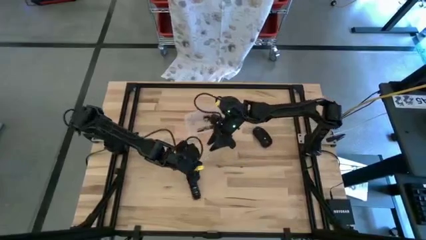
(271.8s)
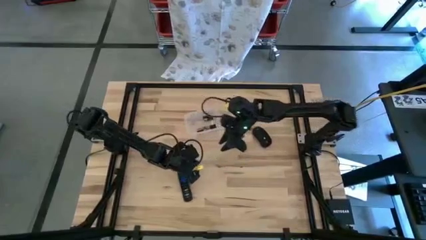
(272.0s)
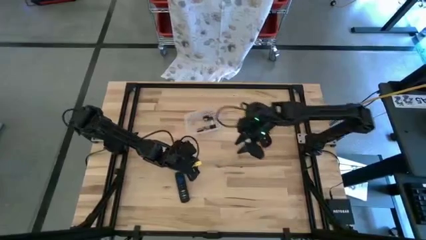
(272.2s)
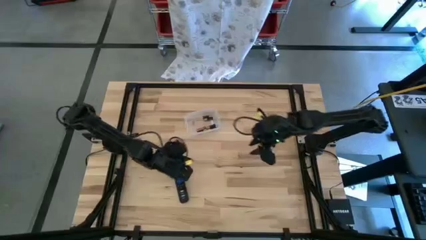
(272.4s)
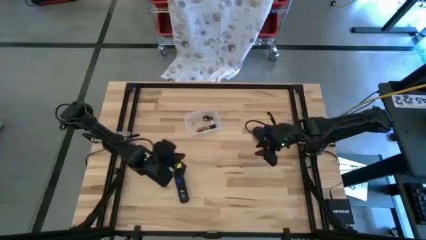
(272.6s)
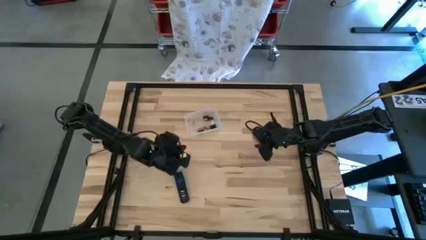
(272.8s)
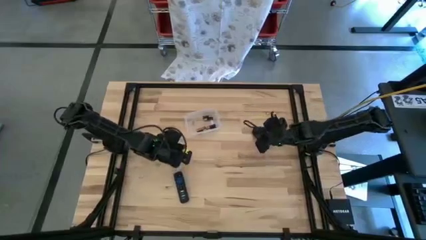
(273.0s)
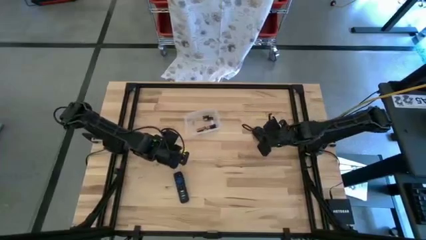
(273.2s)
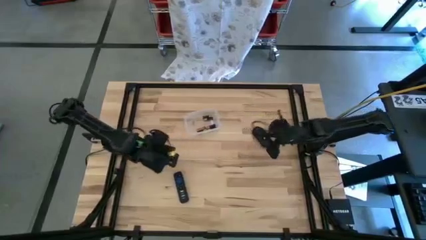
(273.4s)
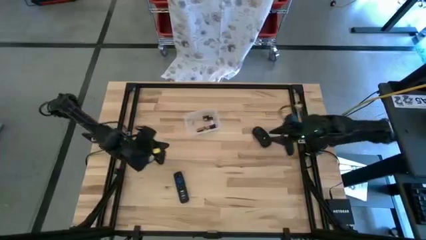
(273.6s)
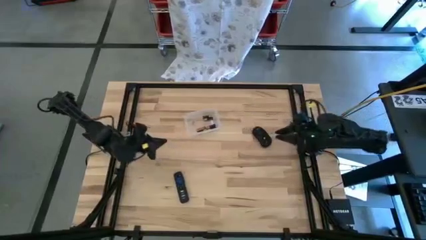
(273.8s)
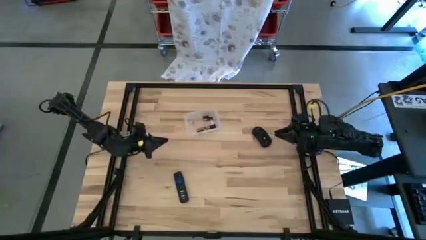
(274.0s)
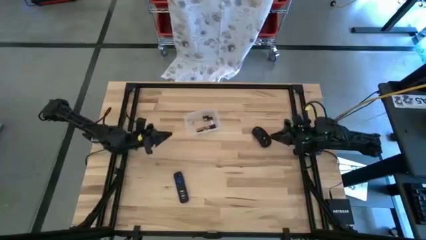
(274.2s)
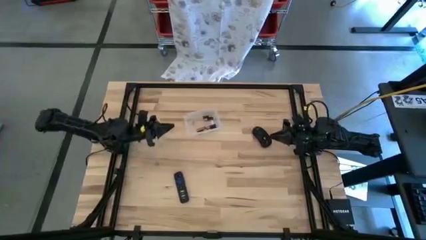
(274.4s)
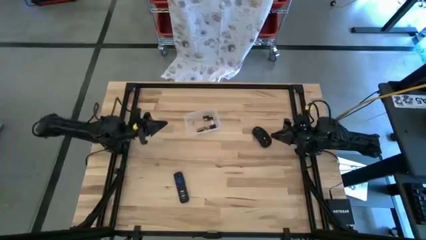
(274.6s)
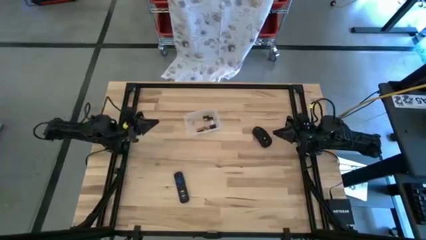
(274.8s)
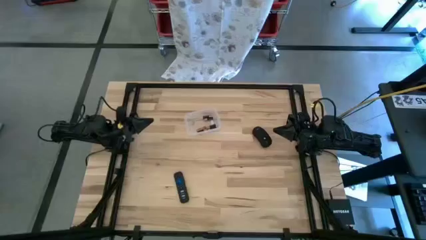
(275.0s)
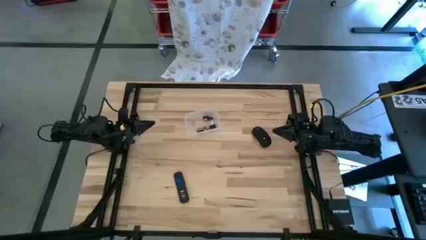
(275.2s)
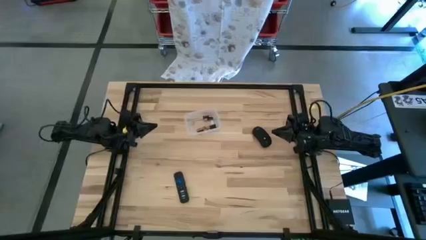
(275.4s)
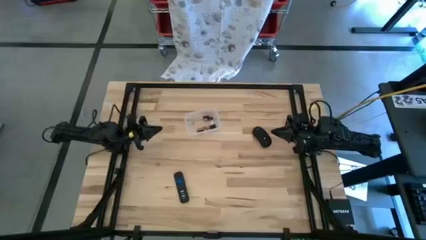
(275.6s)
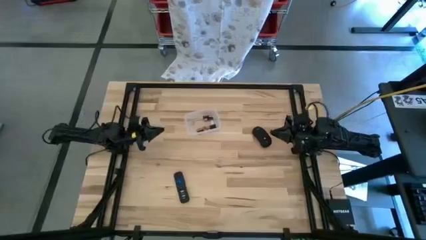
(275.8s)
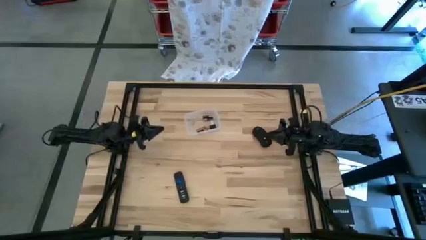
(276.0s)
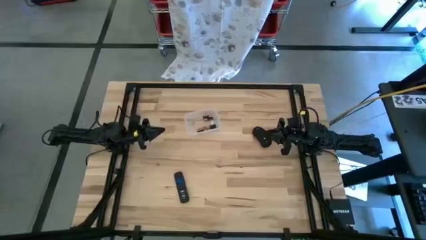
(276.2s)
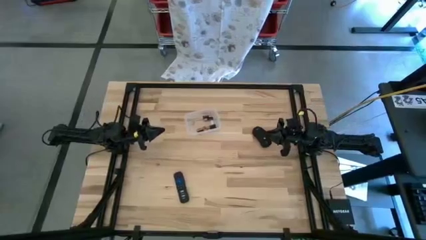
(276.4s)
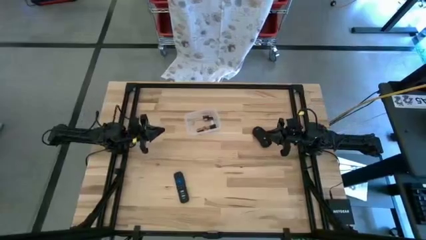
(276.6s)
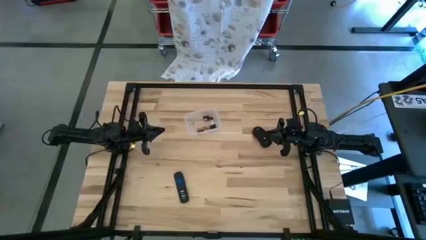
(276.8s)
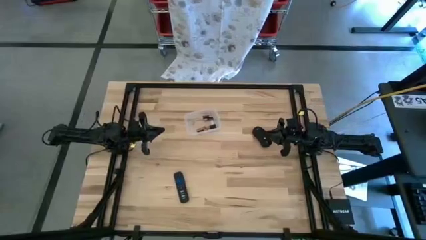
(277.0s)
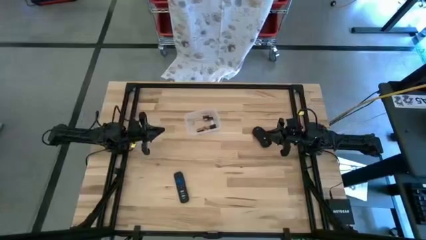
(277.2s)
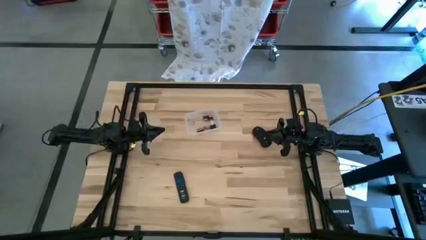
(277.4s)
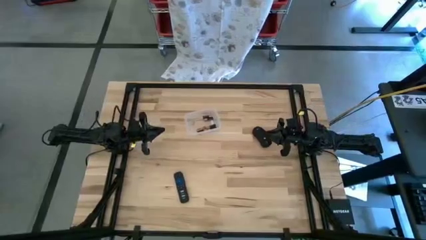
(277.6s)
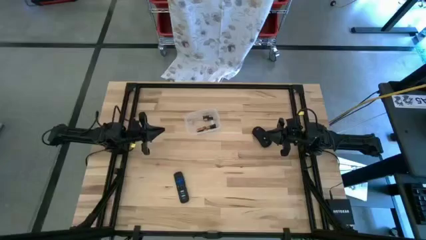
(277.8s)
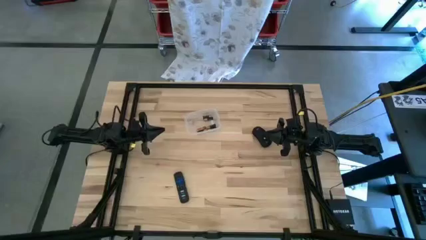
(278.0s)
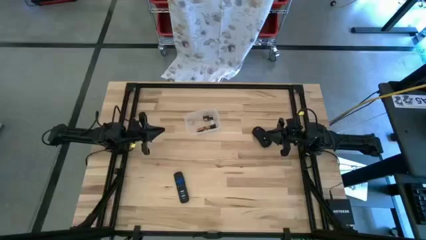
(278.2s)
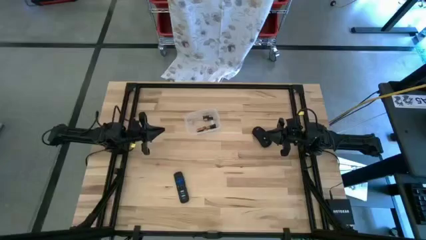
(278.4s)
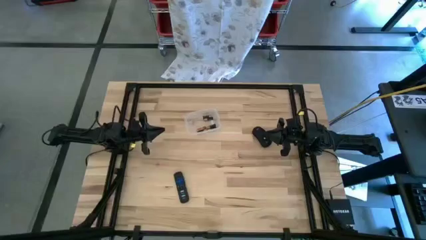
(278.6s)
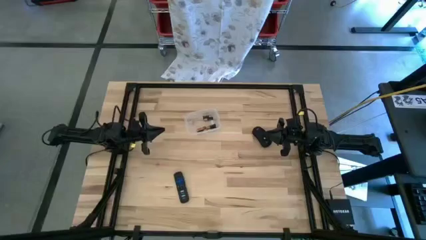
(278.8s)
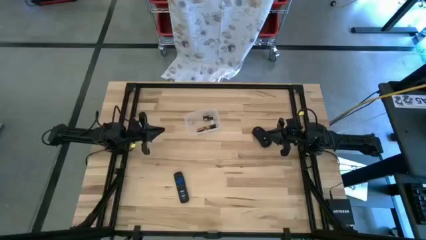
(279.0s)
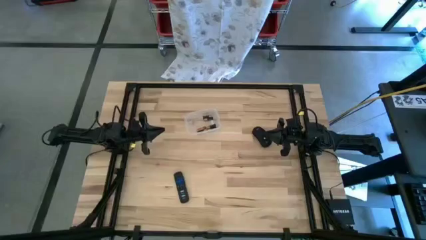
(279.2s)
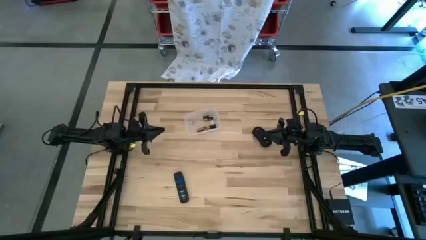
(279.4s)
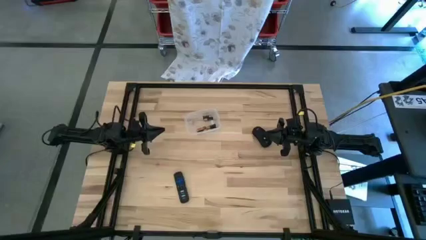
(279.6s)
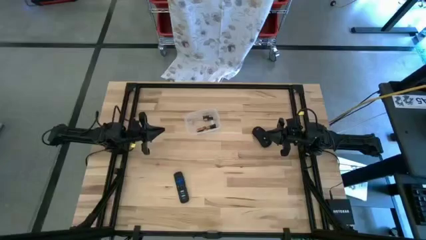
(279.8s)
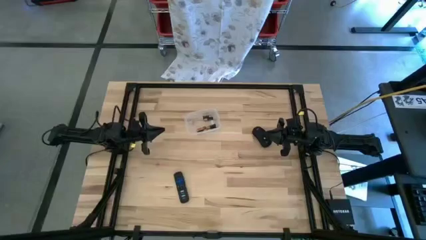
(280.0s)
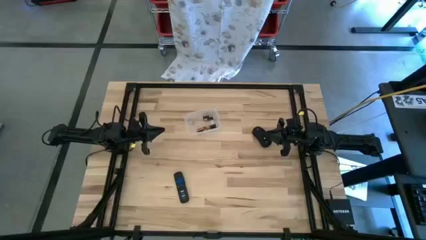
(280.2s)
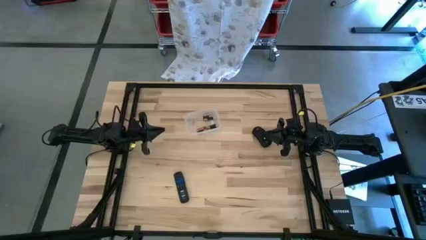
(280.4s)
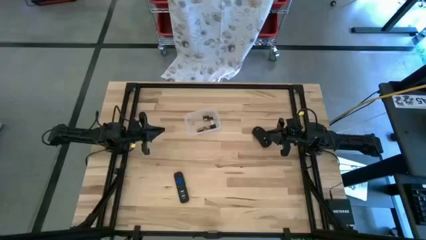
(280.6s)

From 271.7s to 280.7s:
Task: Insert battery
Return to Home Position

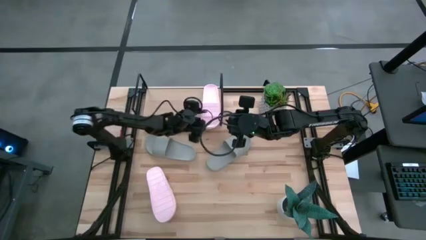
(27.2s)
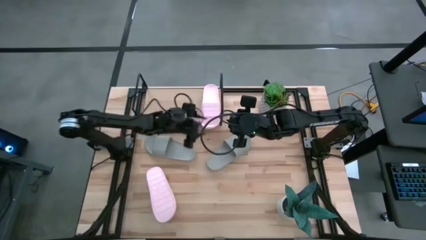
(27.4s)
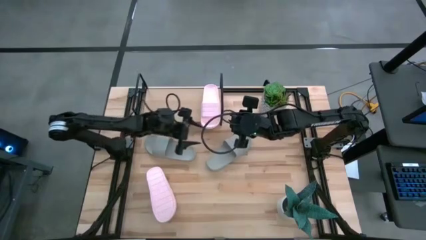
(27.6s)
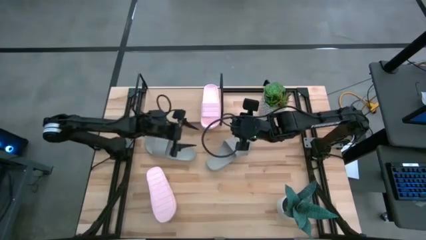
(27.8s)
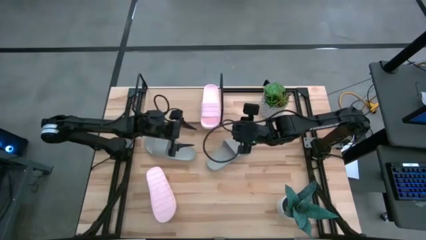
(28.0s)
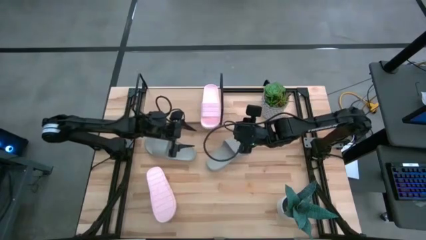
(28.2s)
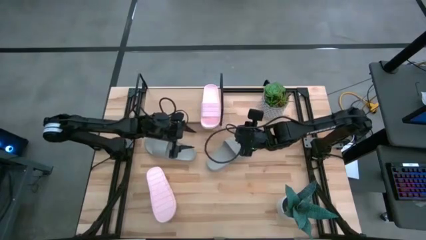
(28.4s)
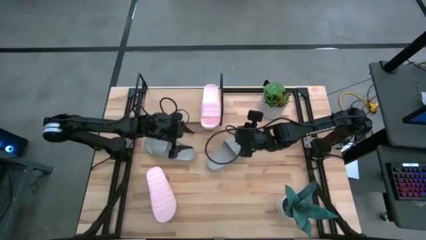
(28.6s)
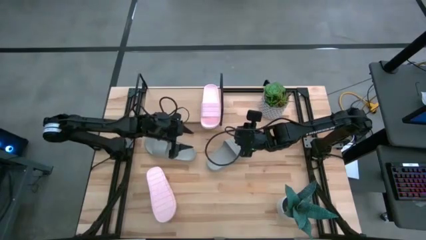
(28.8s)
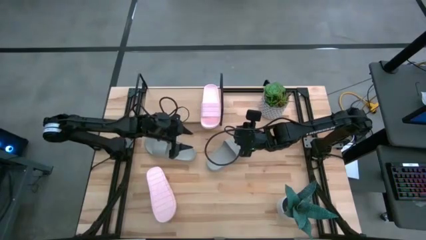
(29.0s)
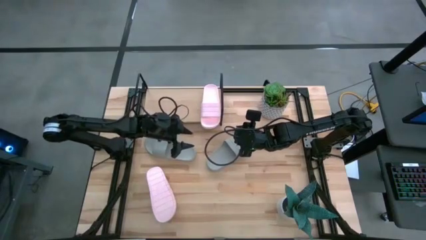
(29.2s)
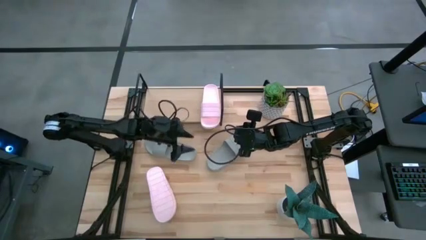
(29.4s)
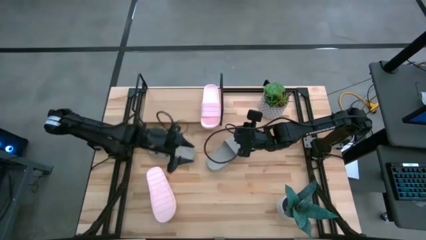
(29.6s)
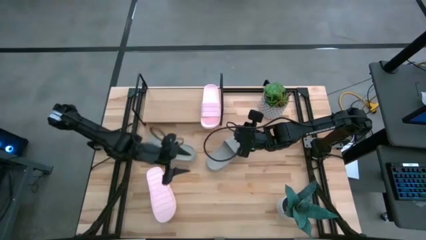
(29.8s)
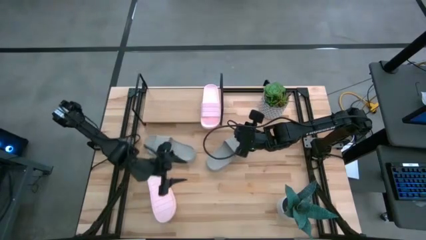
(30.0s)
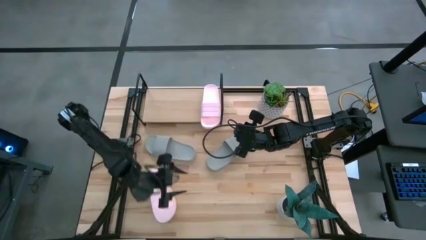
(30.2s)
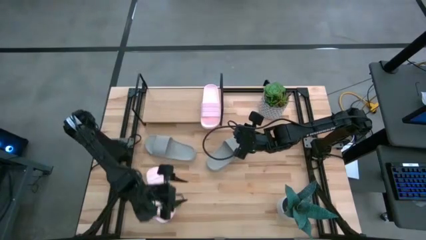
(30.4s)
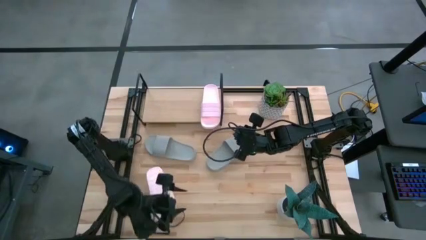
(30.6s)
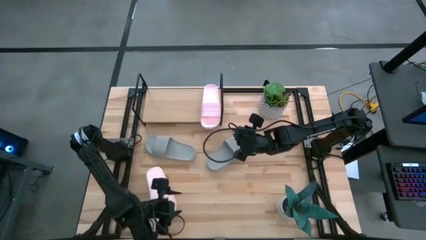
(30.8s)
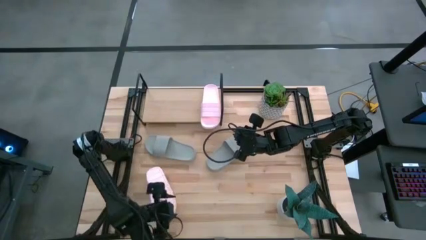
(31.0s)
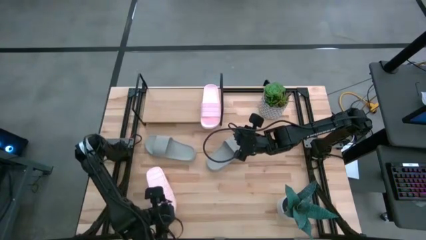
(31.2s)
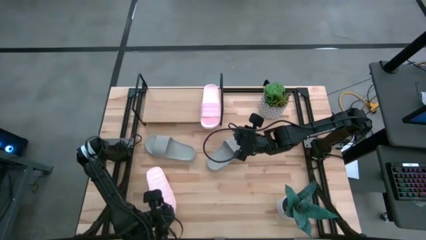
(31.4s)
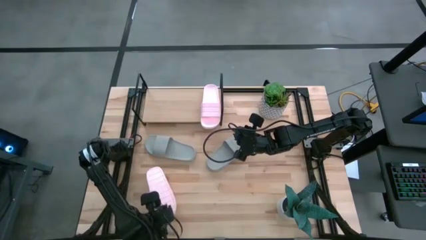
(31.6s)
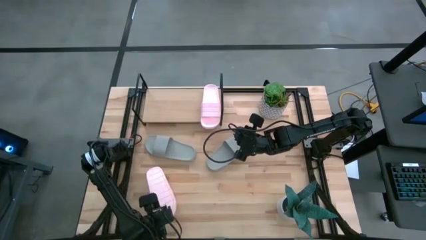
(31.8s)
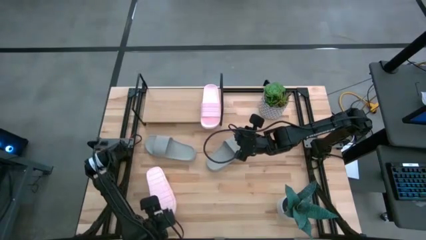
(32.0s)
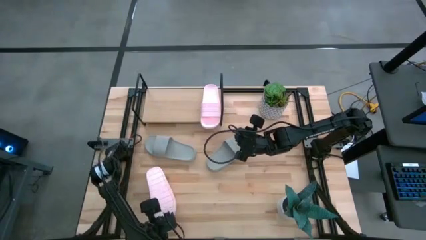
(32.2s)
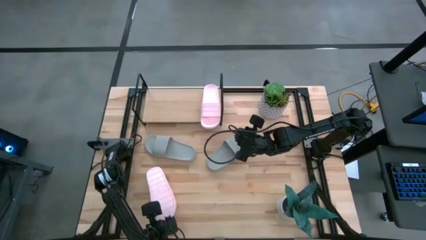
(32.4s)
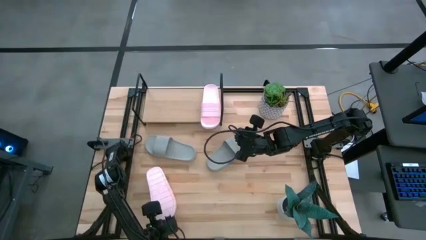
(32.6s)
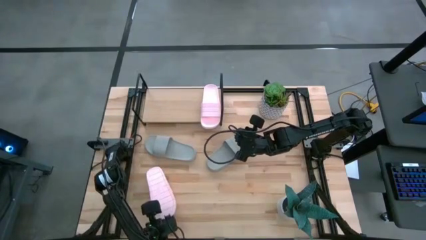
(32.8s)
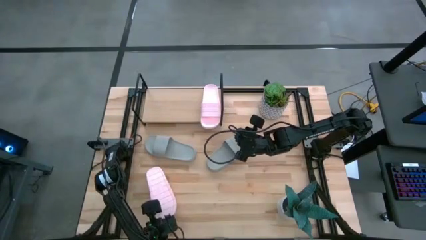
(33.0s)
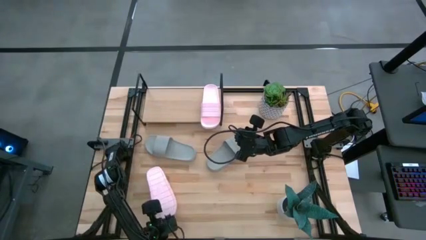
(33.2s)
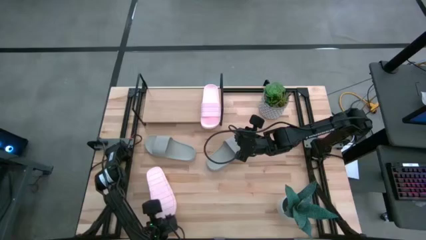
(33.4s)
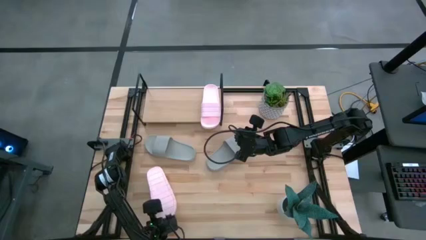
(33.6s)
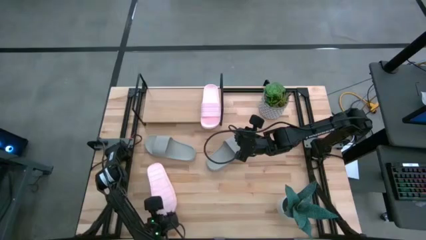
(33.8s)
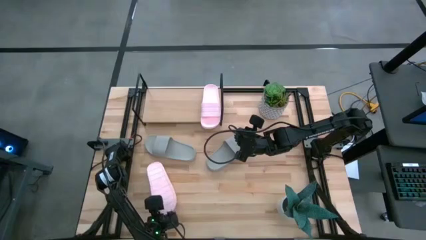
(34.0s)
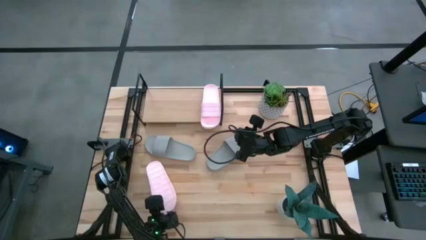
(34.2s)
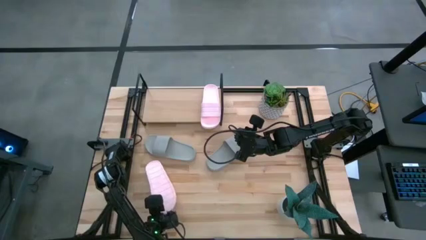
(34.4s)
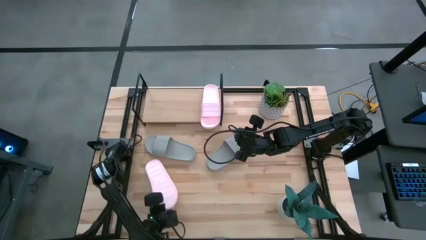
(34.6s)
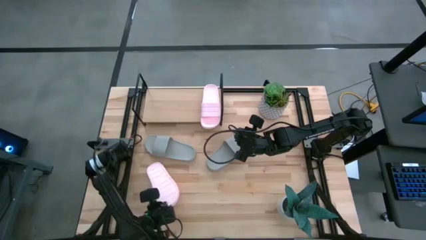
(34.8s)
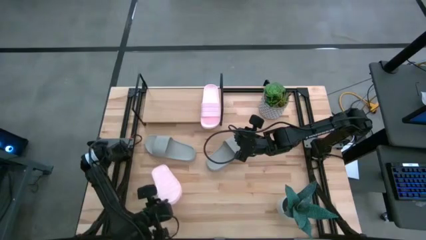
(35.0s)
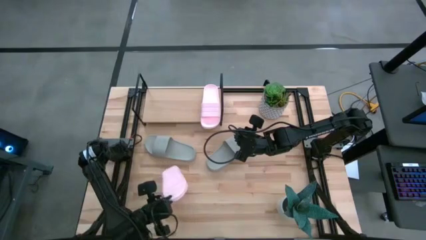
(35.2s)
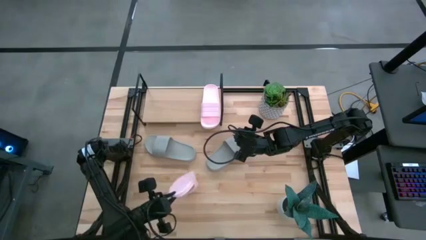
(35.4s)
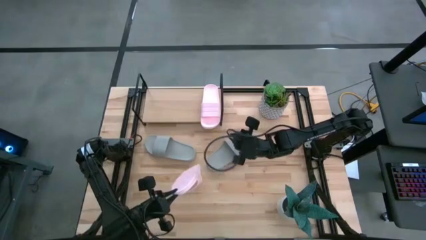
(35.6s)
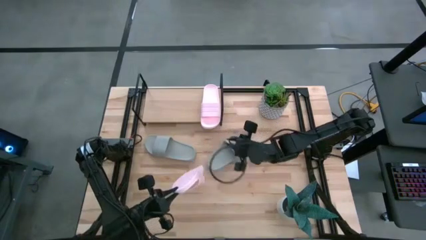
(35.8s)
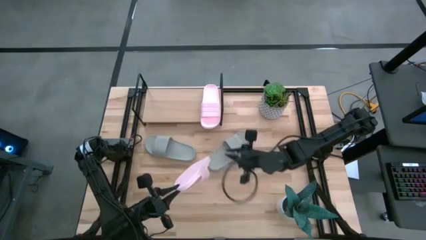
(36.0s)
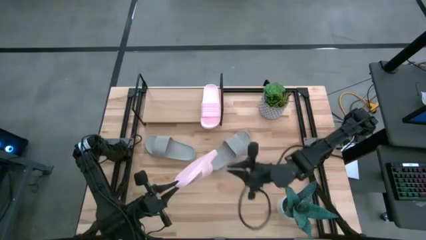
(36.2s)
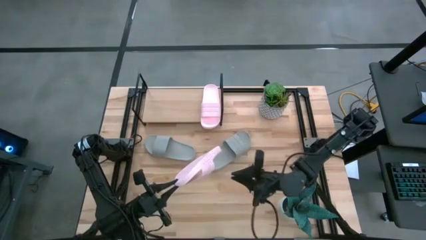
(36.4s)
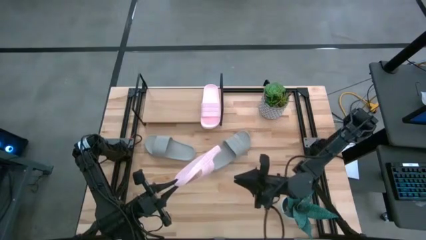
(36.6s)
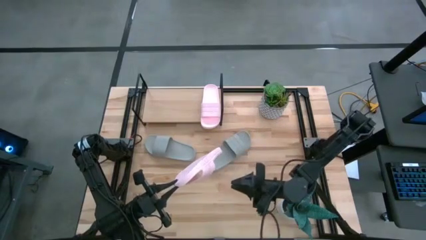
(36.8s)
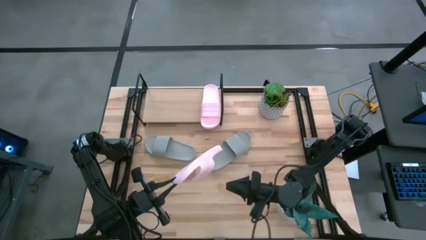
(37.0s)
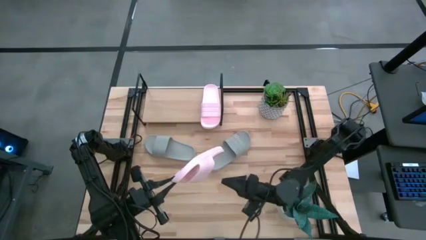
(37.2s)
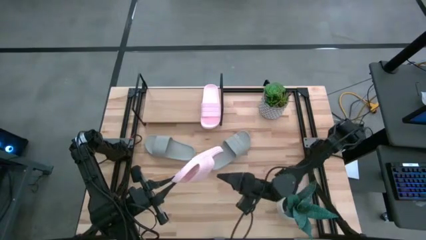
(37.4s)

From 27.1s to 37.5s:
Task: Pick and place slides into the shelf
Put the pink slipper on the shelf
